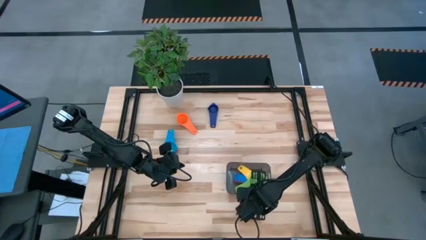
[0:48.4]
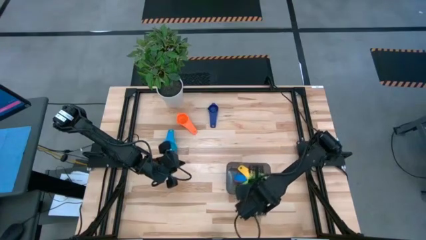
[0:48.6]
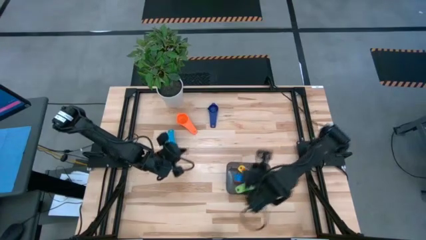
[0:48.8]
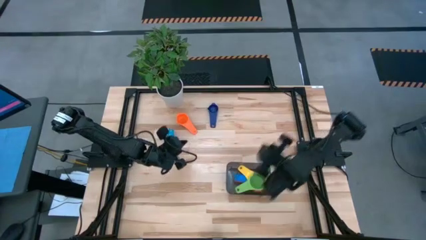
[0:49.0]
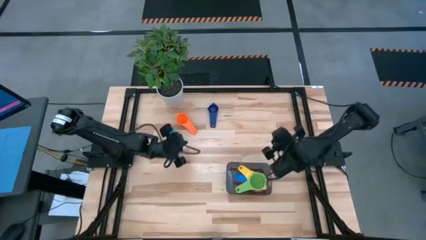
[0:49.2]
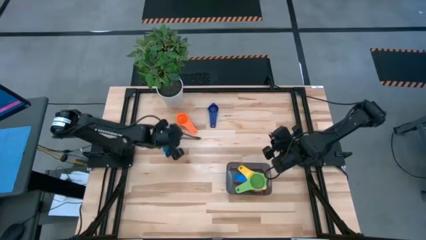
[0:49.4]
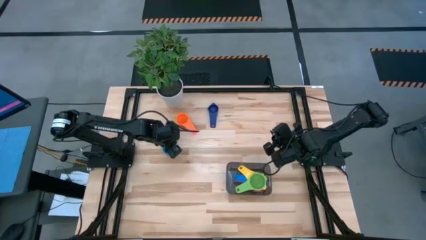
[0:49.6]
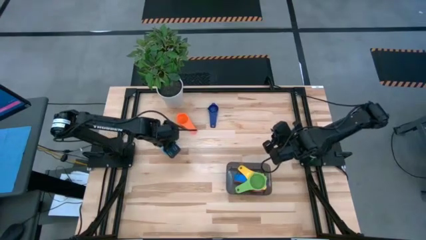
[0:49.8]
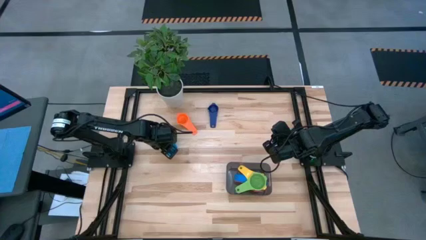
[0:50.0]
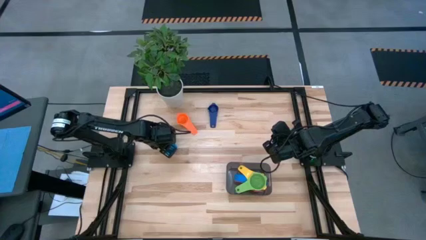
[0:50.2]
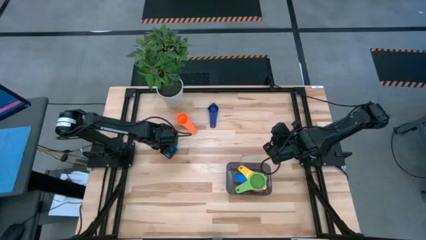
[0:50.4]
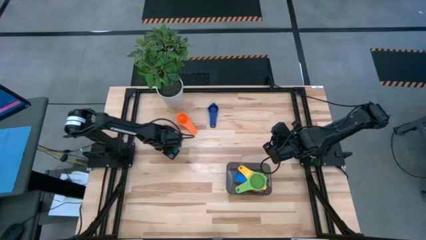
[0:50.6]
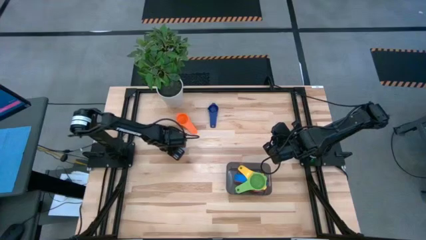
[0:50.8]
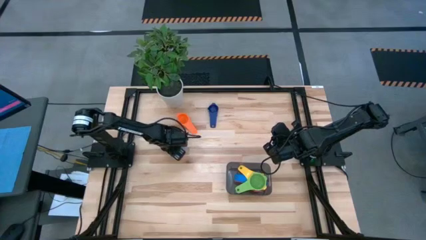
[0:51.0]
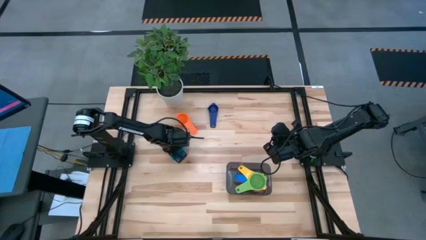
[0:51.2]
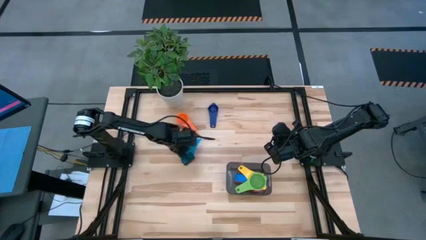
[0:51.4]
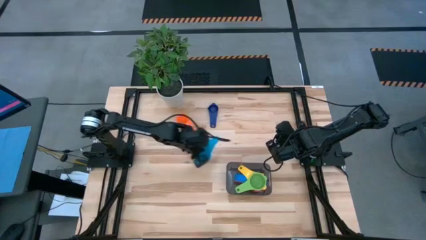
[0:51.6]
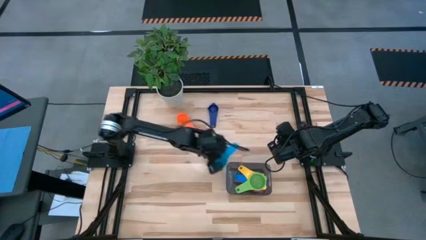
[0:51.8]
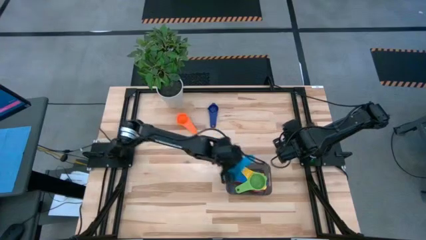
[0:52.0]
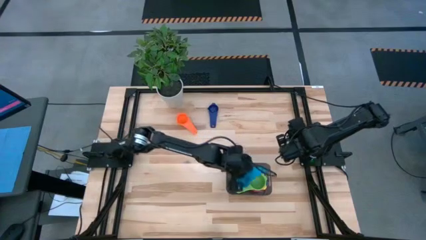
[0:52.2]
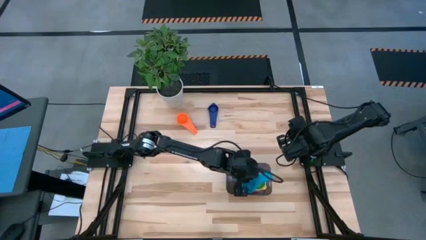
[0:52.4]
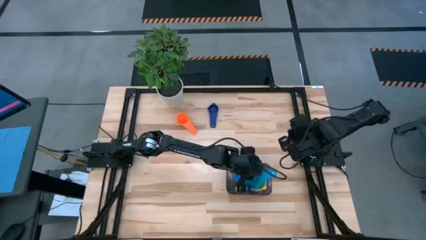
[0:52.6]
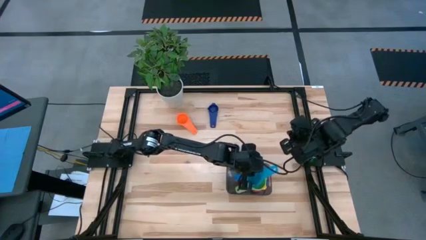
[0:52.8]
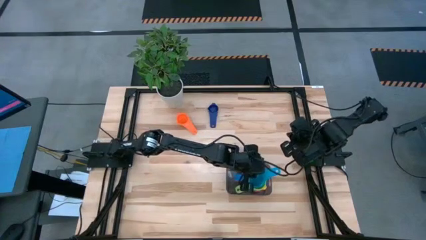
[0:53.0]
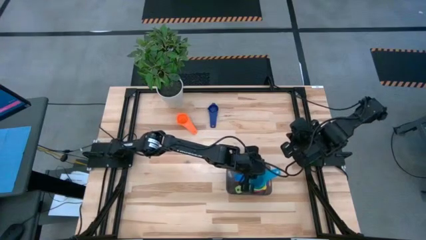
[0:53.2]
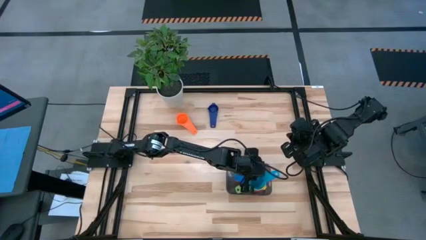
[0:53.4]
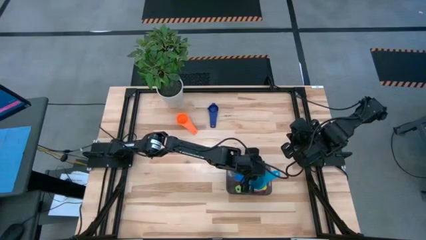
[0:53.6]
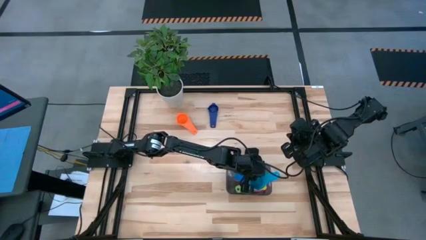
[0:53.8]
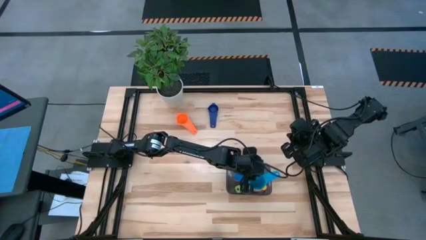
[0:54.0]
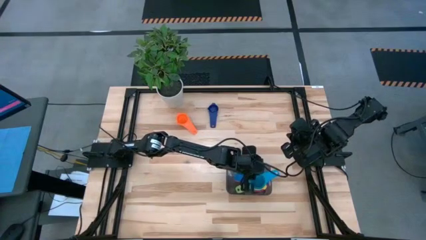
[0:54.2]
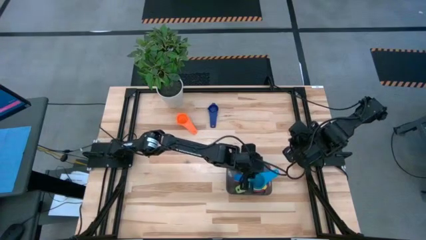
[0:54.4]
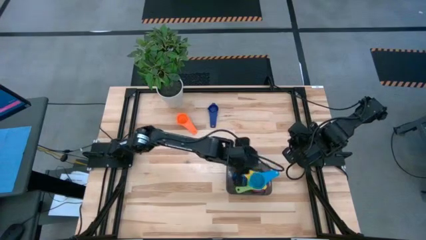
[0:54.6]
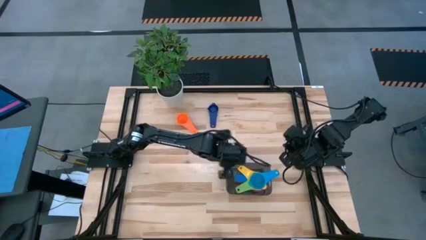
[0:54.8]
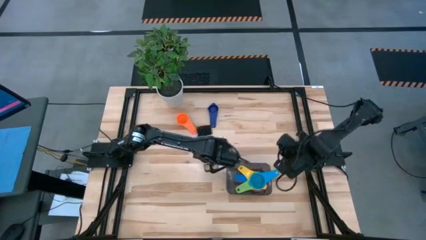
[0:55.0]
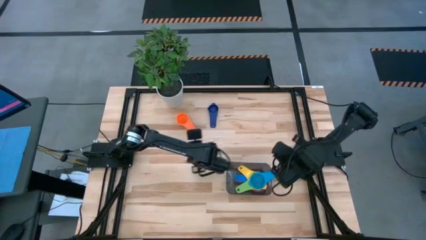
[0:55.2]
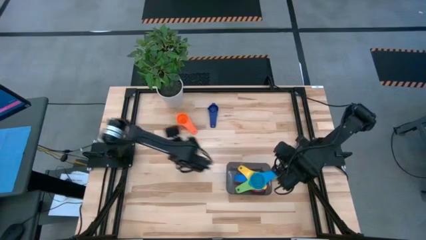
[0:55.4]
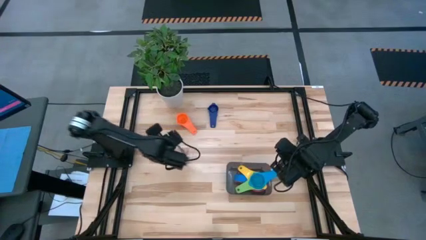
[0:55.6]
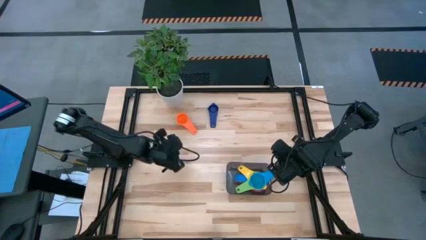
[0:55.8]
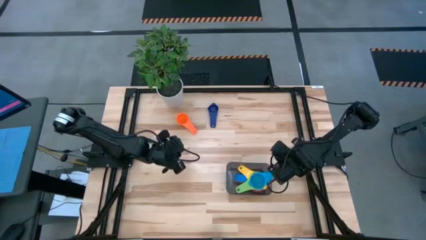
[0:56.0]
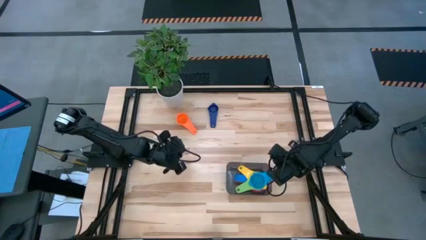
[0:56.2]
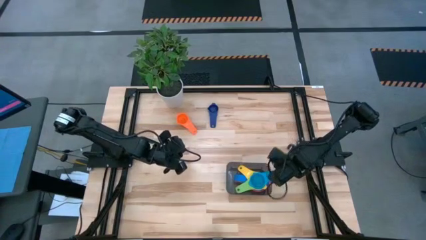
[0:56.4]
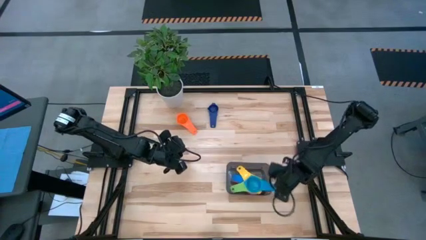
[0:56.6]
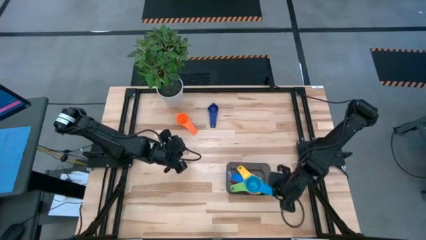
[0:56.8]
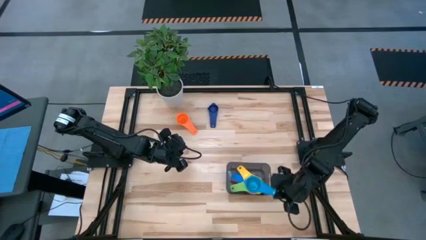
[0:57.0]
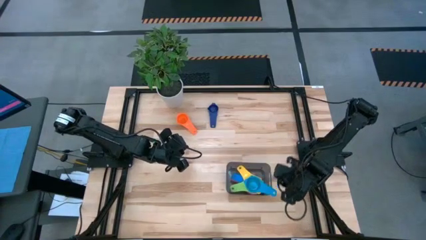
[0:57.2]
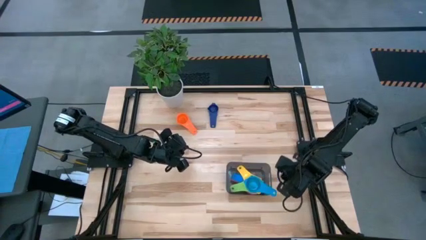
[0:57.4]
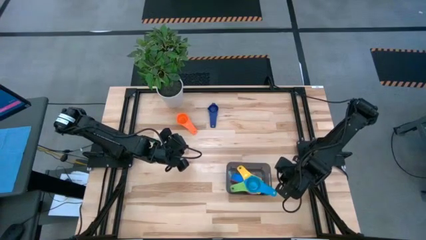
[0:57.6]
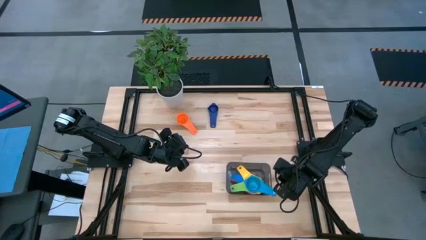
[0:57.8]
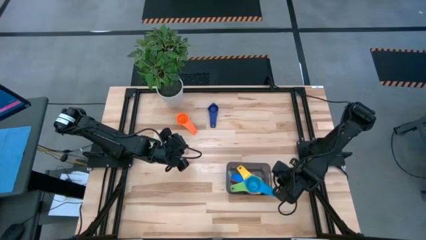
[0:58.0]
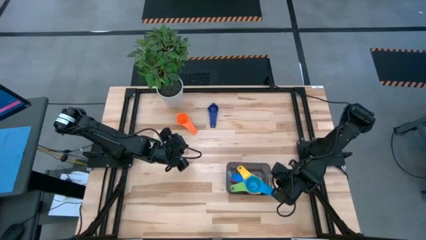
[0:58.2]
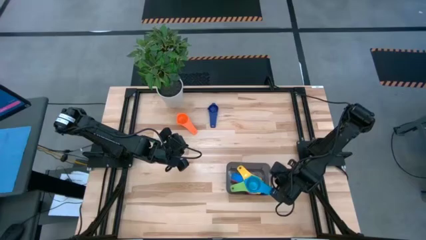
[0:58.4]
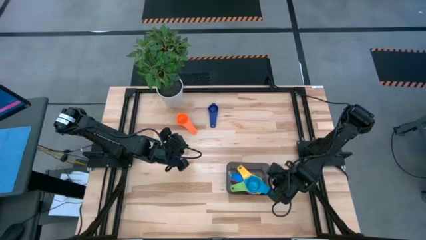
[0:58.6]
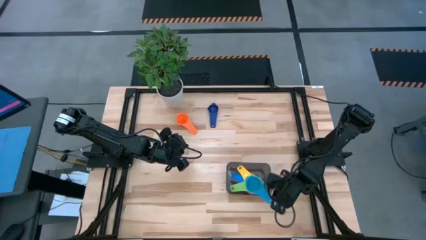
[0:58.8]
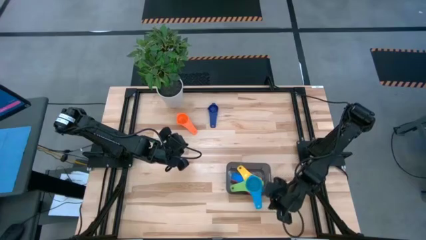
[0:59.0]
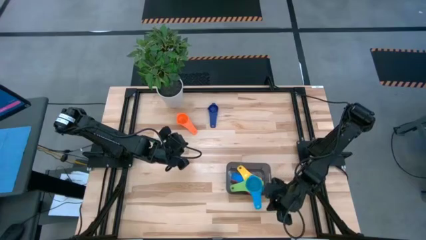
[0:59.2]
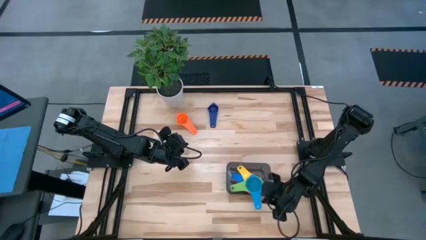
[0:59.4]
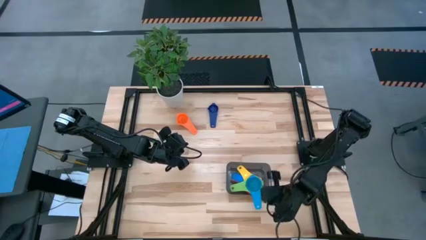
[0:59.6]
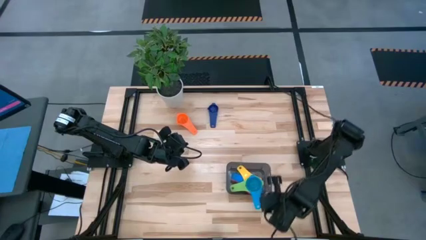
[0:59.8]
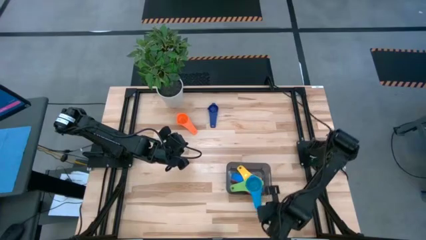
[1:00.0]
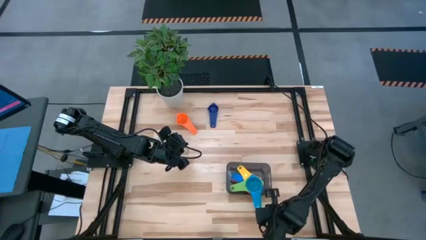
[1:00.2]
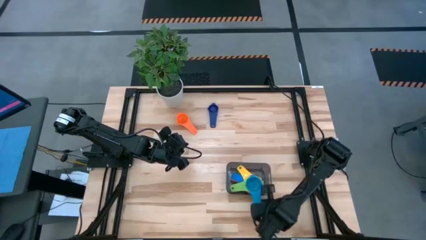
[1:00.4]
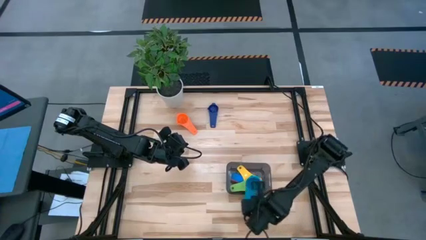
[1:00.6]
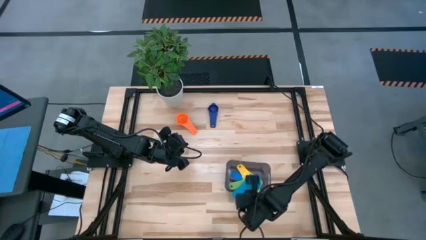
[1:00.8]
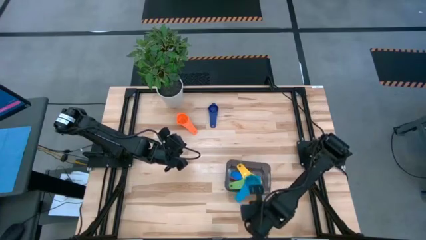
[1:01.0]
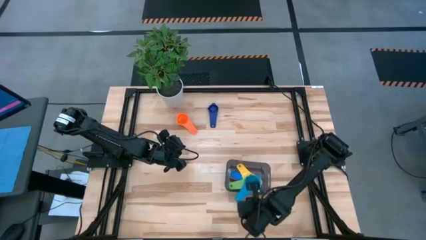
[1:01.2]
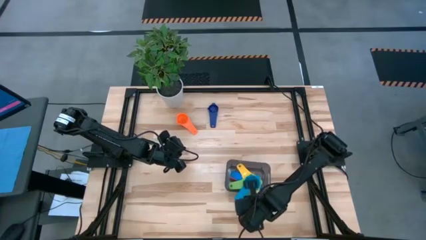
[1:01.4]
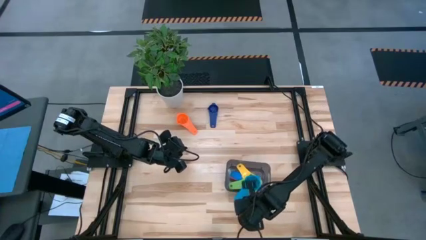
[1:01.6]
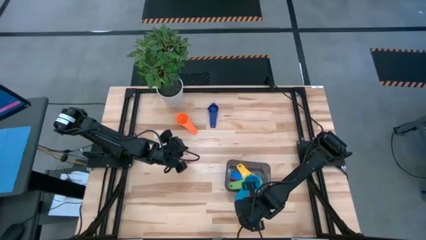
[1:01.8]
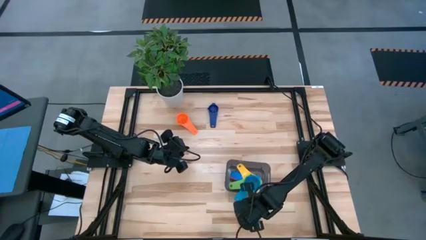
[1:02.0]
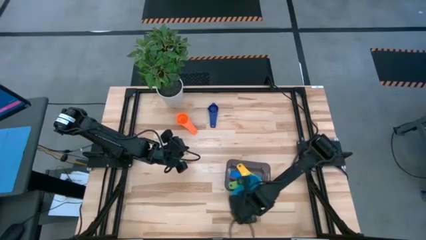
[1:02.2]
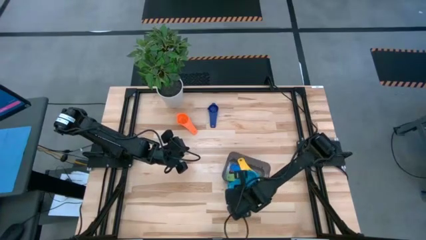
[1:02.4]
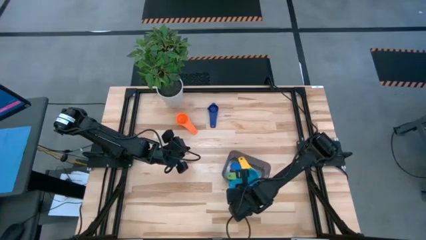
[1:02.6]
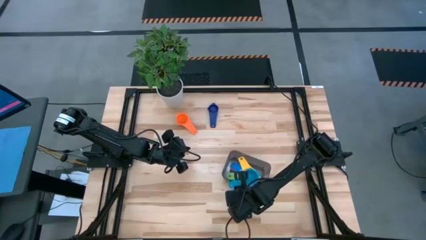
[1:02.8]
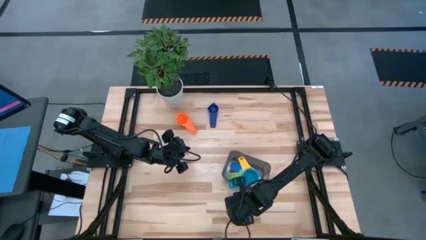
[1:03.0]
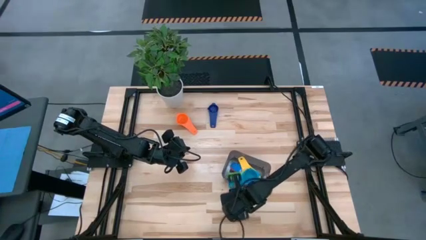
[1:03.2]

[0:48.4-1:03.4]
Task: Nest measuring cups in basket
Stack the light blue measuring cup on top of the green measuring cup in the black bin
